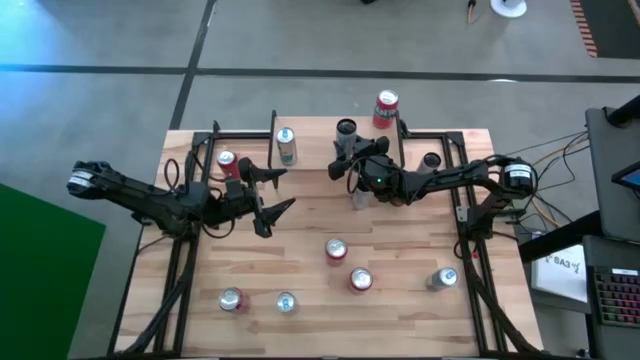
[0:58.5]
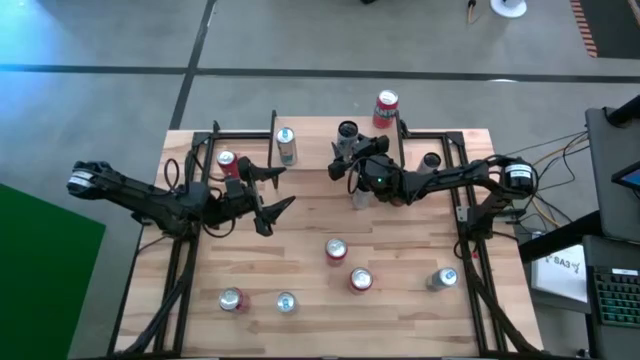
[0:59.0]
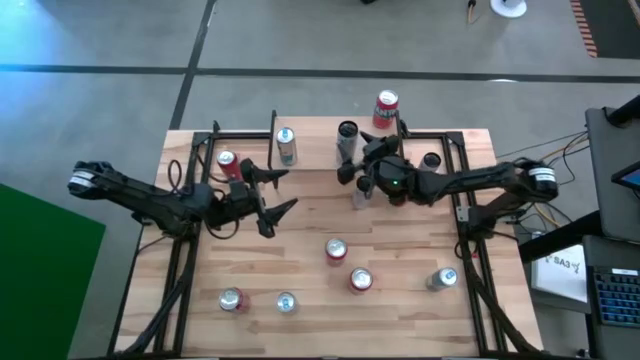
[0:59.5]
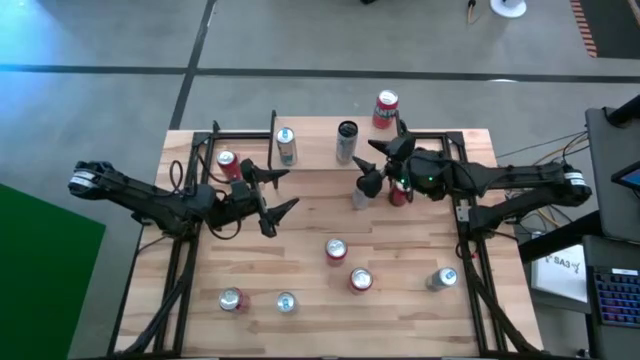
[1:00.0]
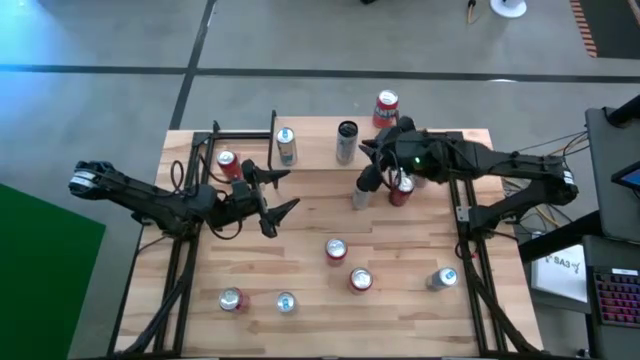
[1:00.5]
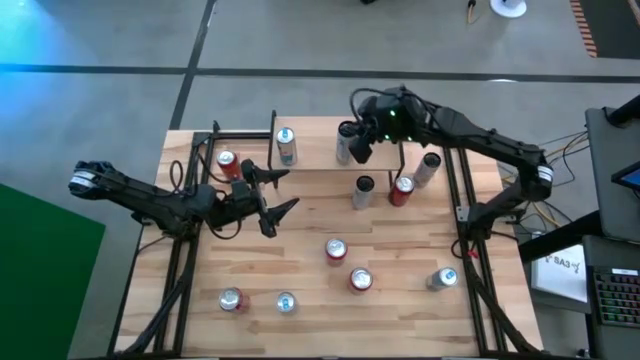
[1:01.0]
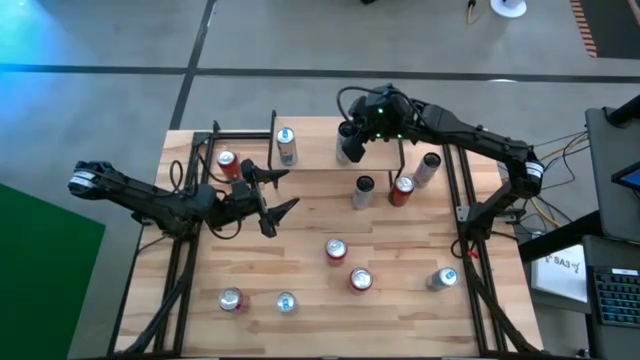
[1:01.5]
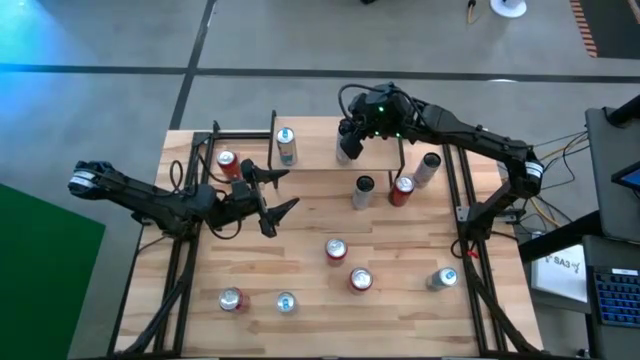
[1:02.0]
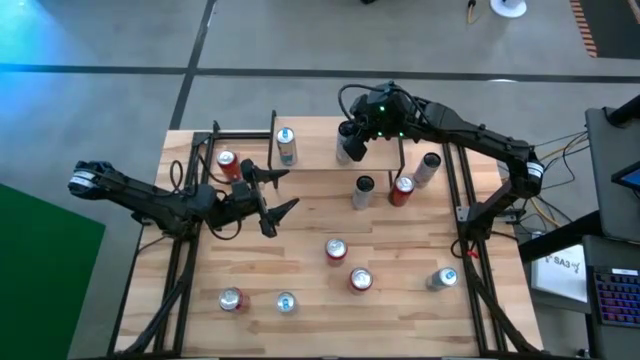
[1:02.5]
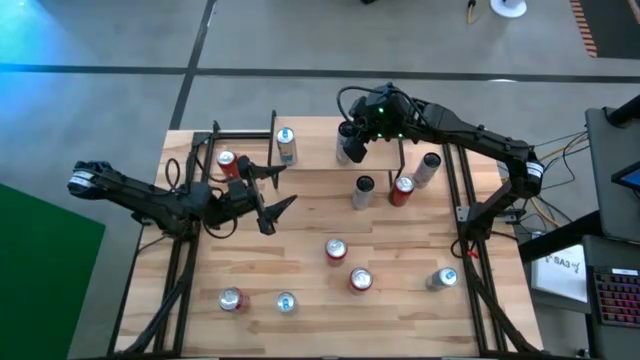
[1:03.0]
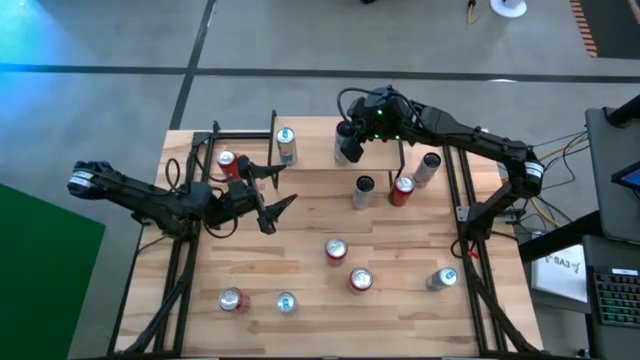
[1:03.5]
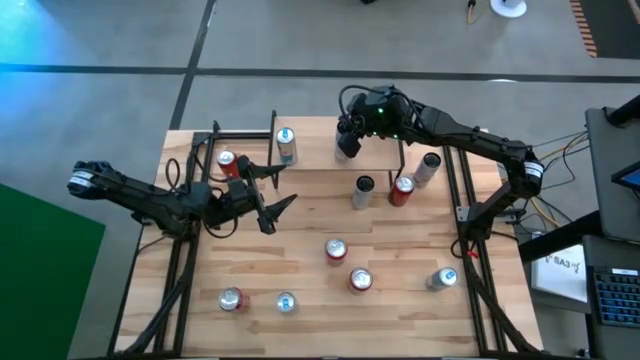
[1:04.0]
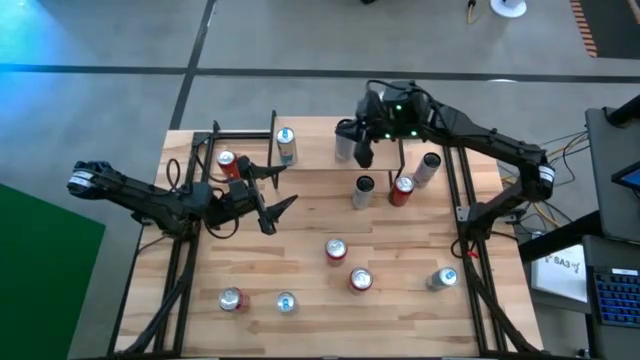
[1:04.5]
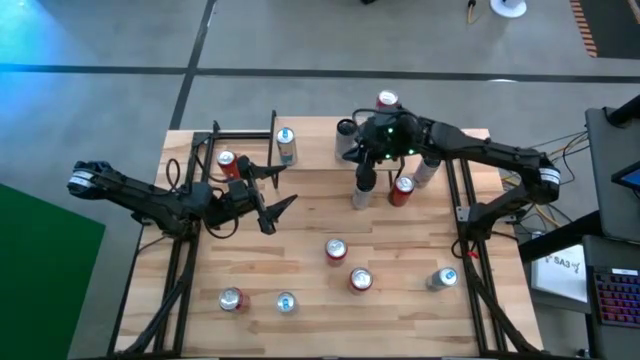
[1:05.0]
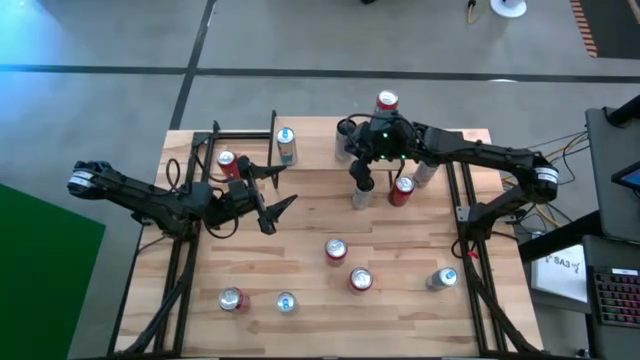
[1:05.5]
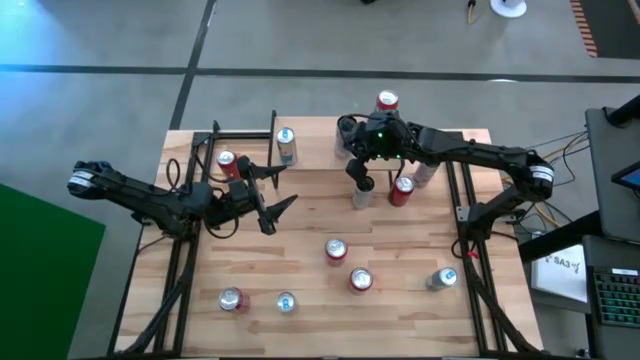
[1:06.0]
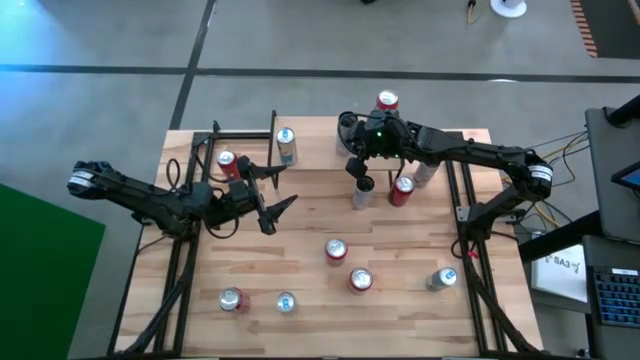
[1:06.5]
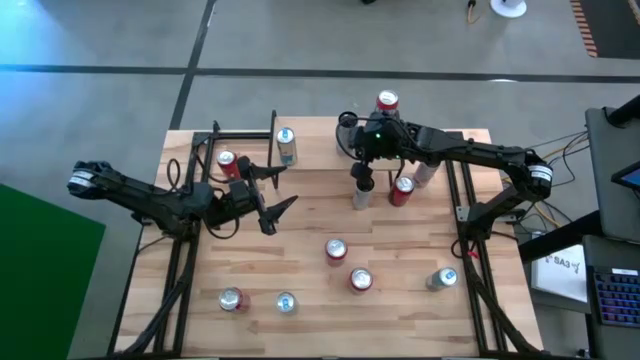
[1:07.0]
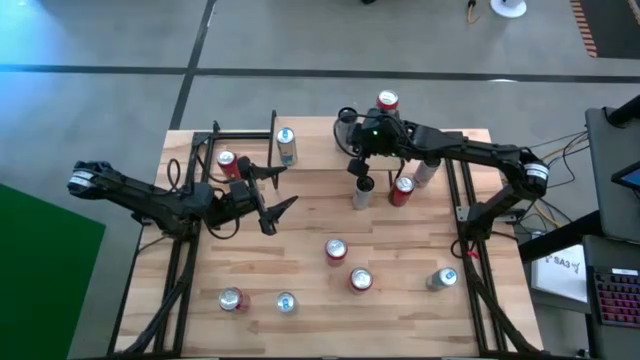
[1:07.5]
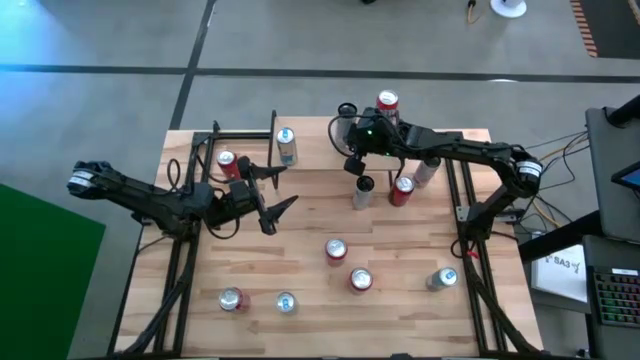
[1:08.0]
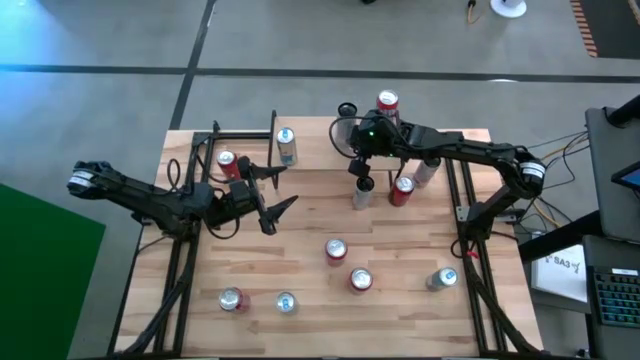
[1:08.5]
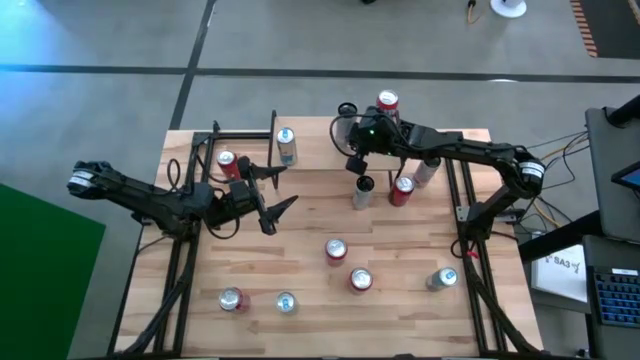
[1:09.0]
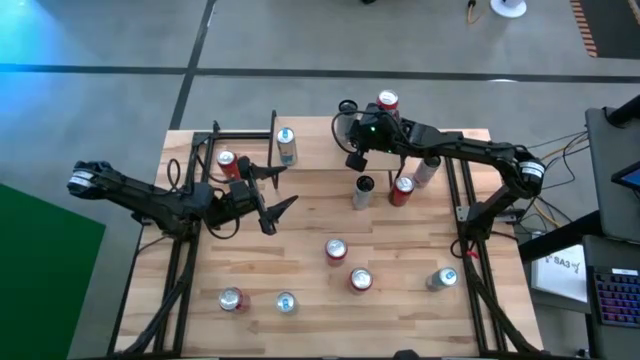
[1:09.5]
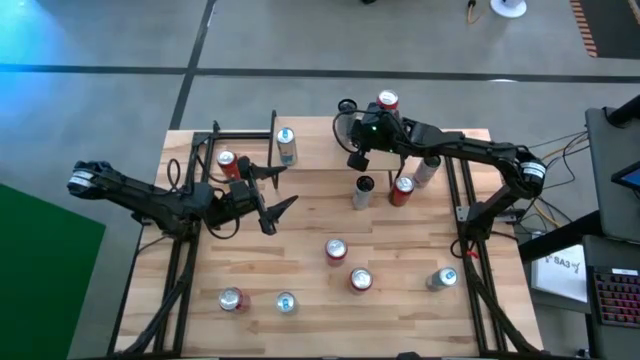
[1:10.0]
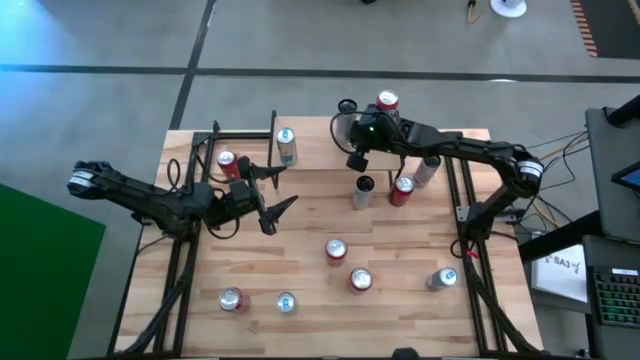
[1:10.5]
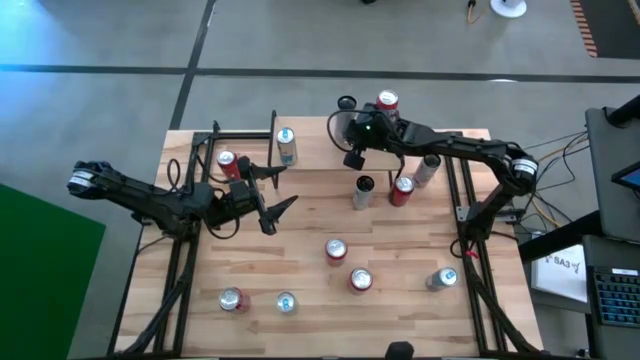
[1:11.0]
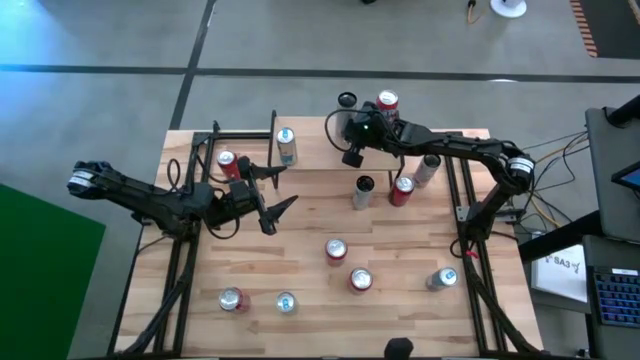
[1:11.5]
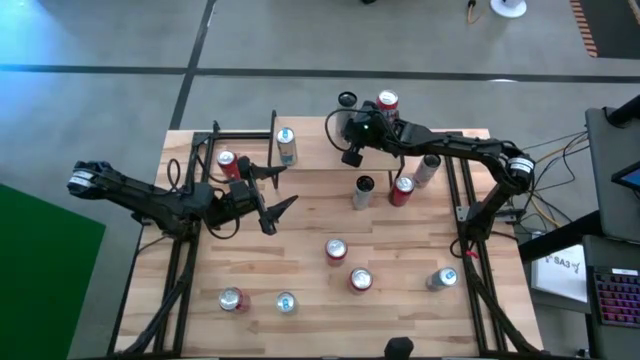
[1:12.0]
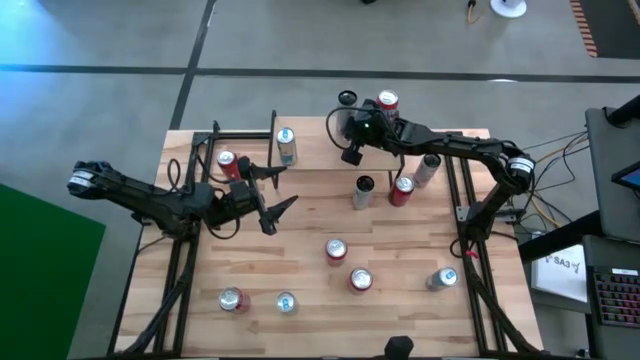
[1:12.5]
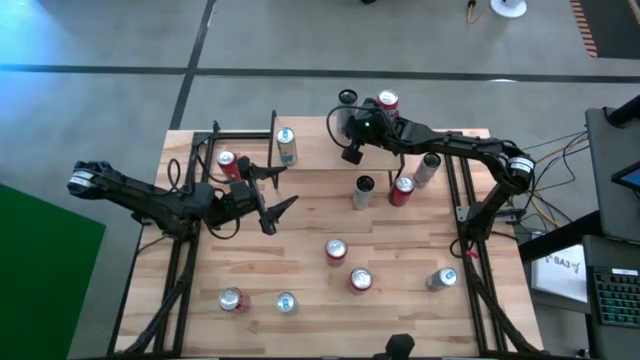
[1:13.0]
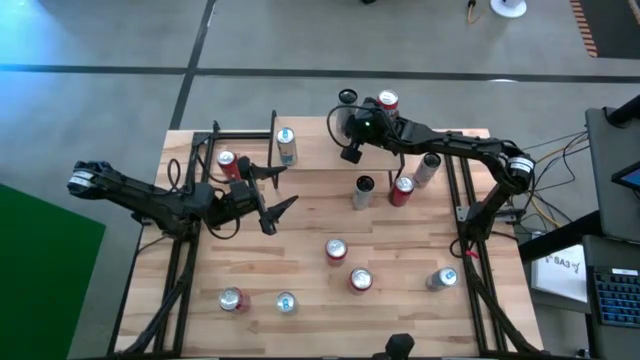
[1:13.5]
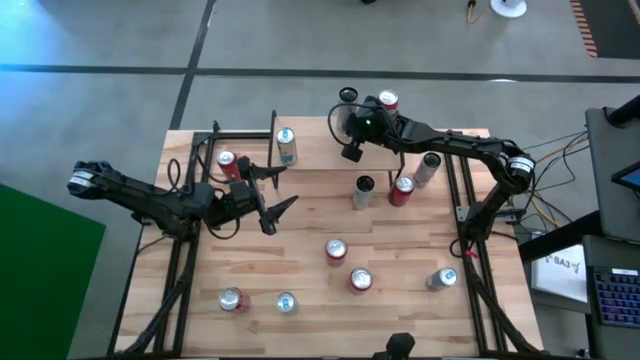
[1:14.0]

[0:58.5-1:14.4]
Task: Place canned beverage on shelf
Put the left white pink soda can on the shelf

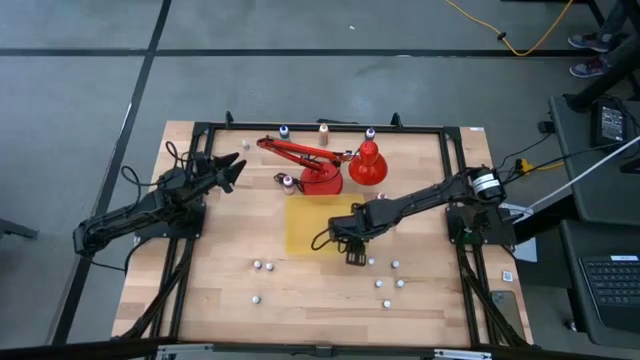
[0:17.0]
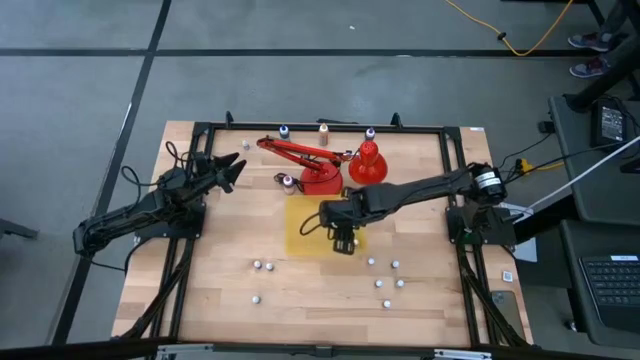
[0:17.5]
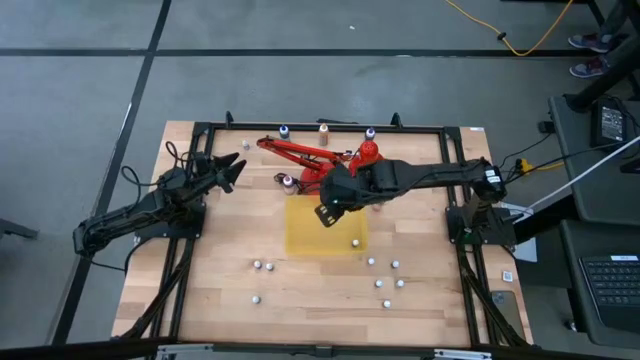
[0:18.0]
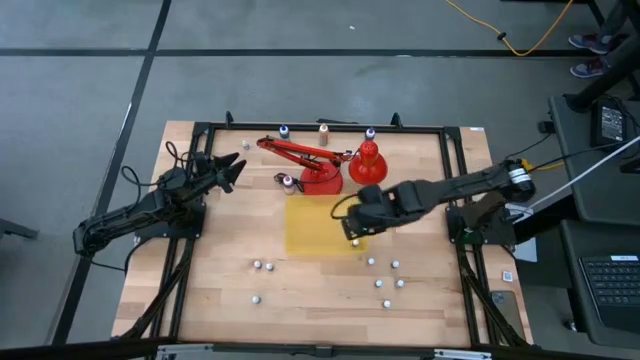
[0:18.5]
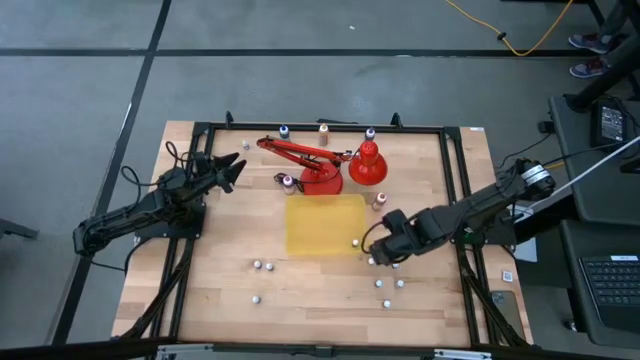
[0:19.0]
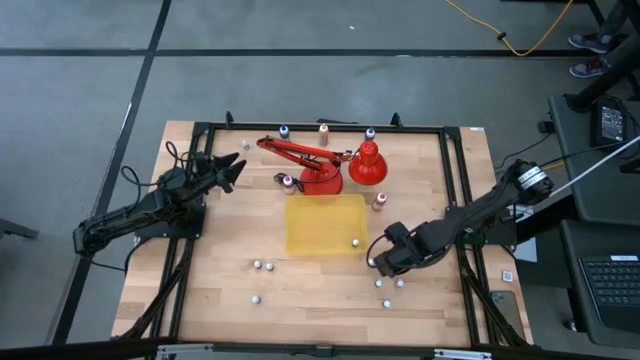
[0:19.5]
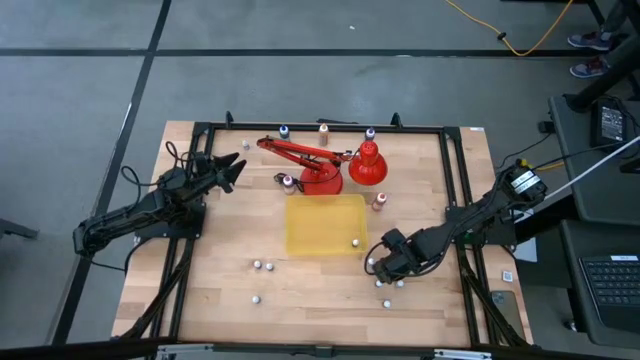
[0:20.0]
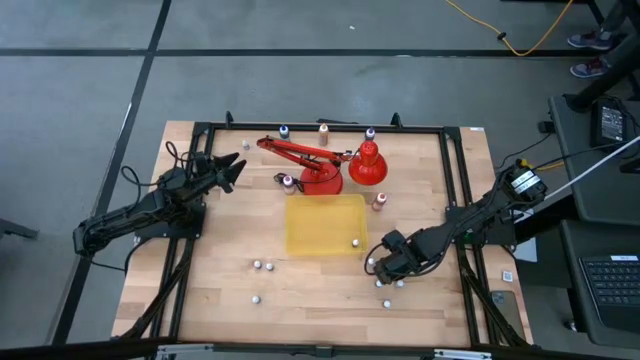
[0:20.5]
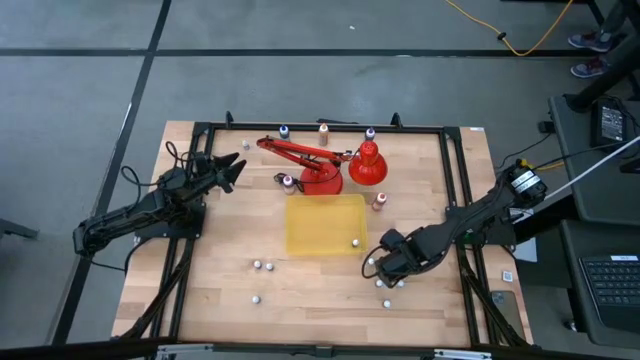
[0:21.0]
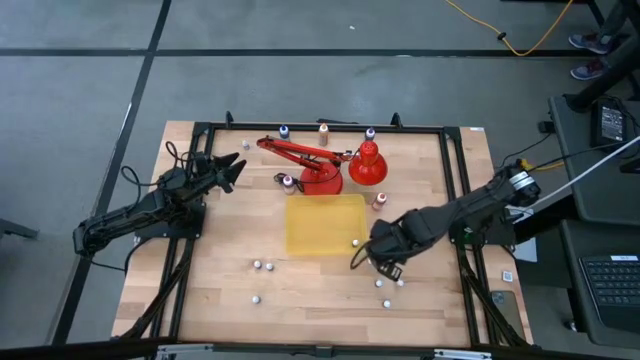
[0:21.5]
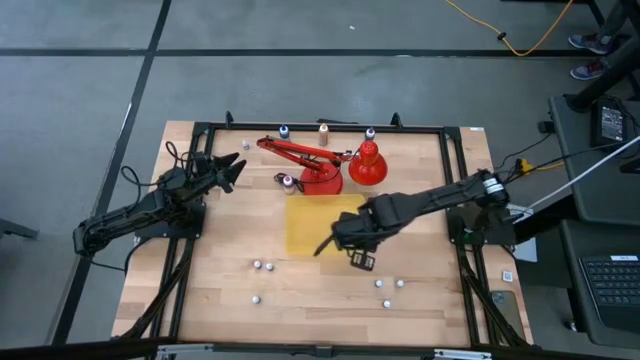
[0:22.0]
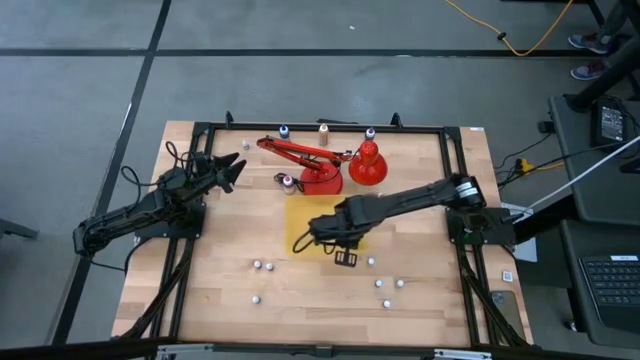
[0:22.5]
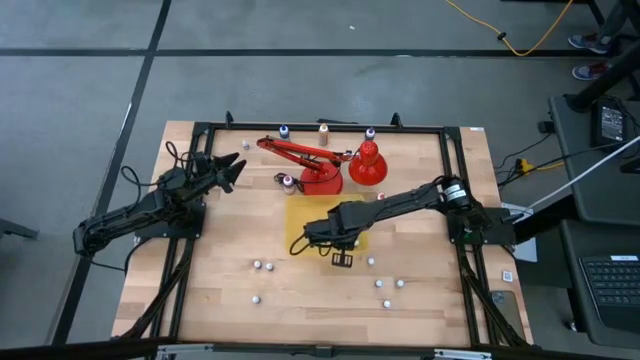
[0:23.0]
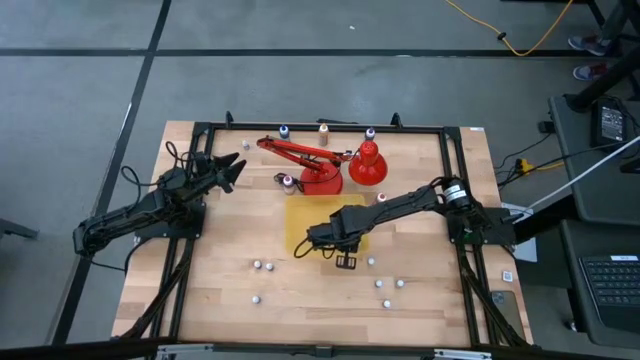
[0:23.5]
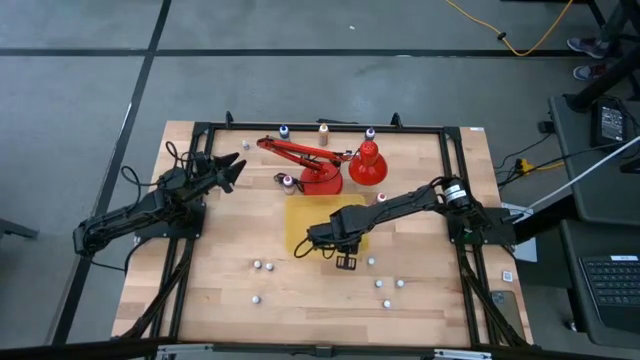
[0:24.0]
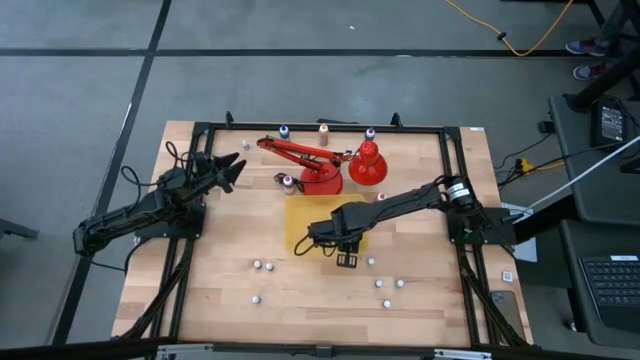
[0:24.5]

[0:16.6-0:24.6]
Task: Pick & Place food coloring
Put the small black food bottle into the yellow bin
